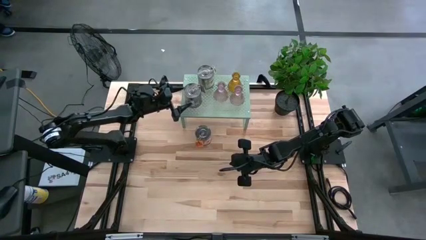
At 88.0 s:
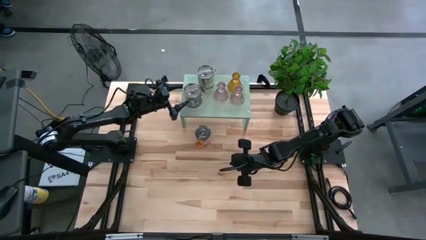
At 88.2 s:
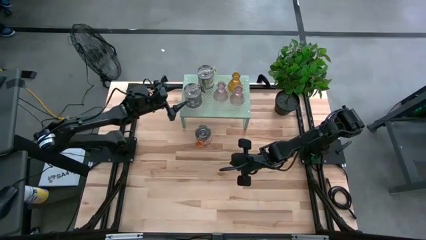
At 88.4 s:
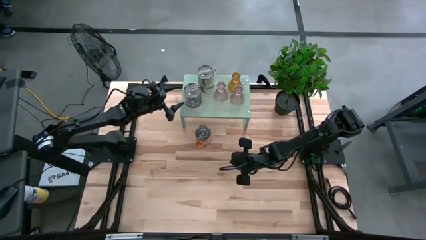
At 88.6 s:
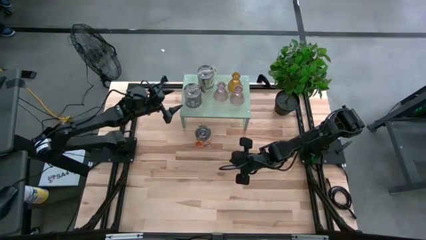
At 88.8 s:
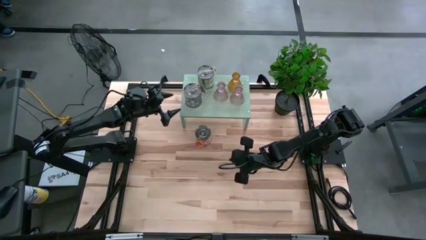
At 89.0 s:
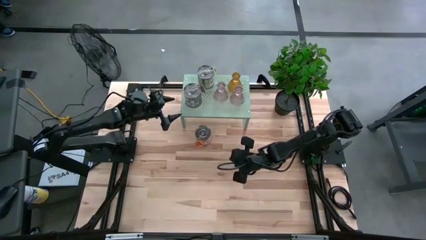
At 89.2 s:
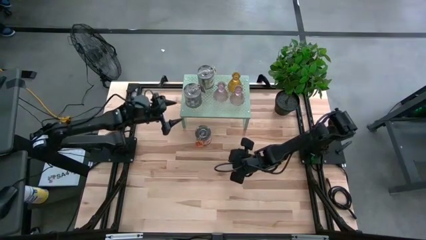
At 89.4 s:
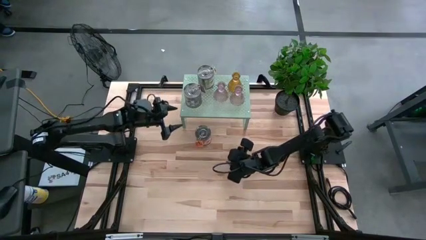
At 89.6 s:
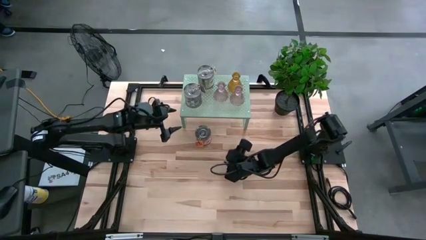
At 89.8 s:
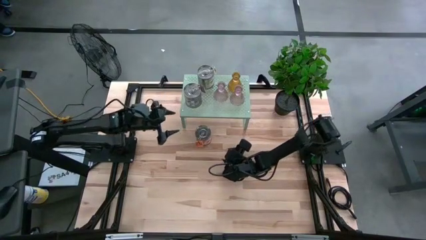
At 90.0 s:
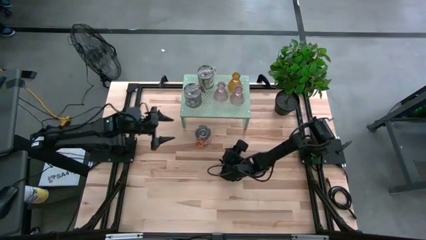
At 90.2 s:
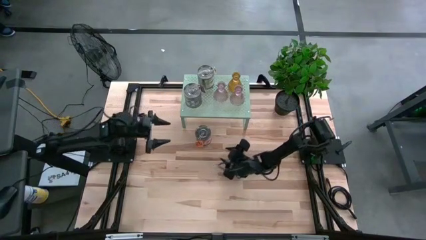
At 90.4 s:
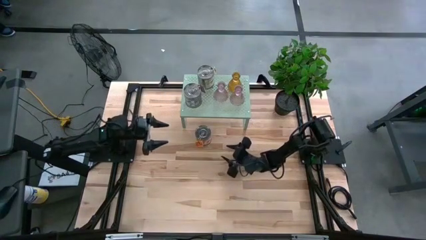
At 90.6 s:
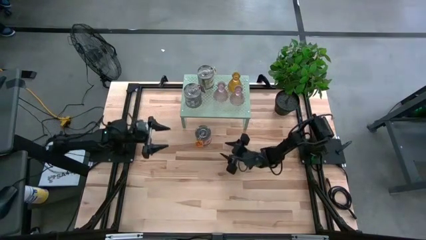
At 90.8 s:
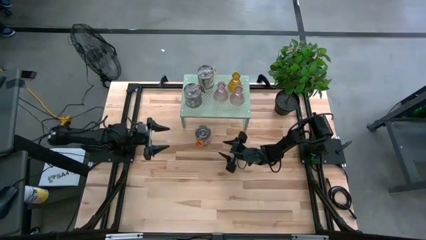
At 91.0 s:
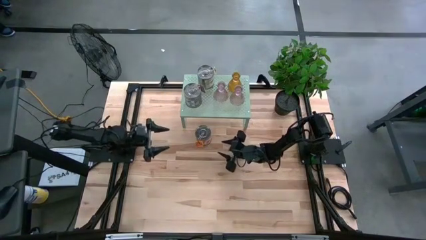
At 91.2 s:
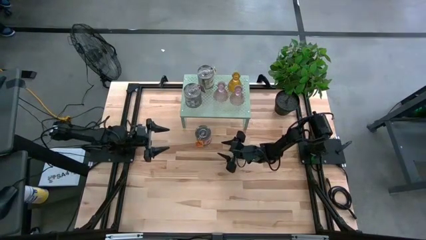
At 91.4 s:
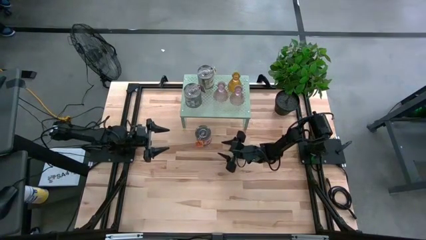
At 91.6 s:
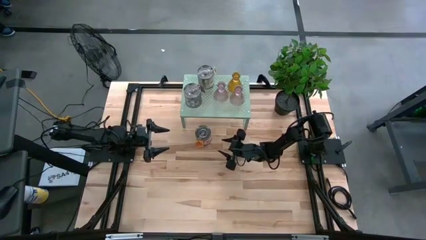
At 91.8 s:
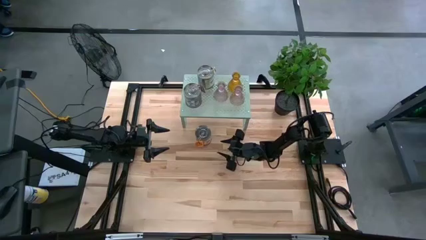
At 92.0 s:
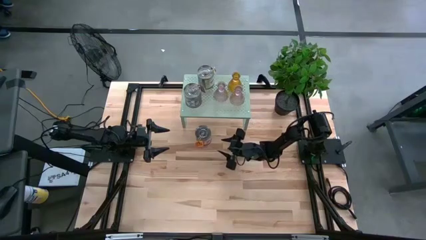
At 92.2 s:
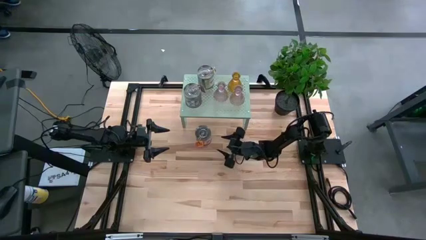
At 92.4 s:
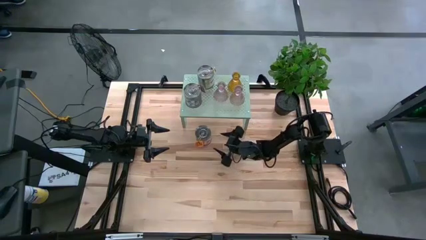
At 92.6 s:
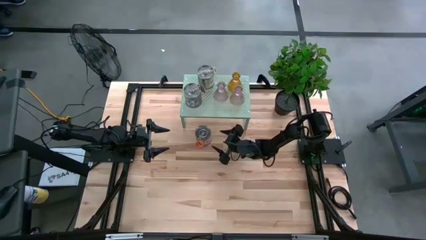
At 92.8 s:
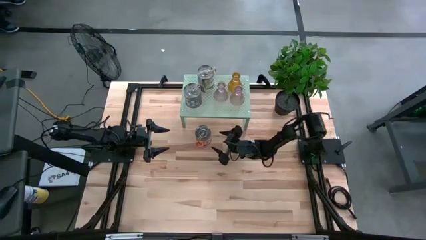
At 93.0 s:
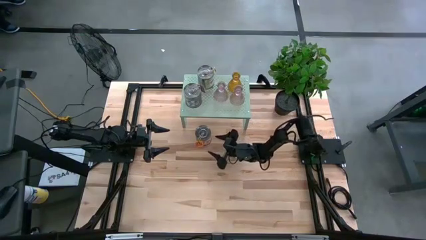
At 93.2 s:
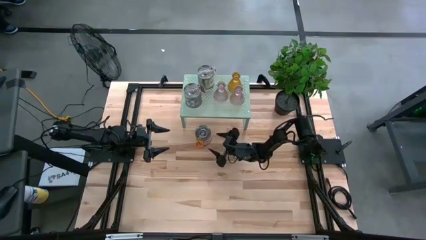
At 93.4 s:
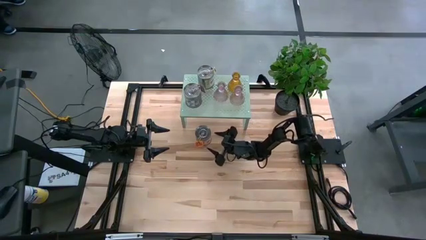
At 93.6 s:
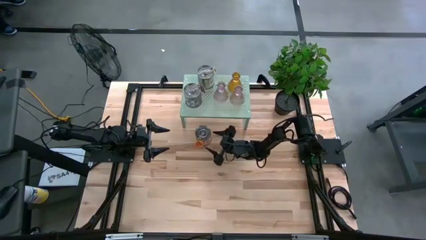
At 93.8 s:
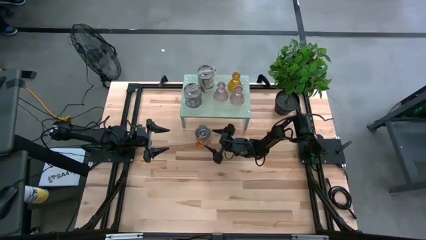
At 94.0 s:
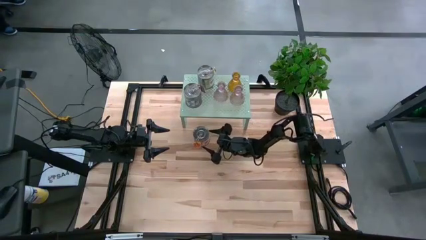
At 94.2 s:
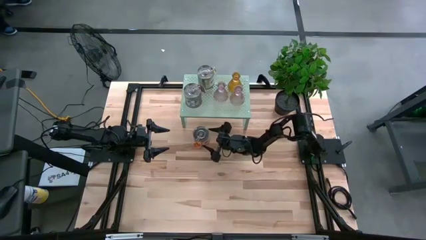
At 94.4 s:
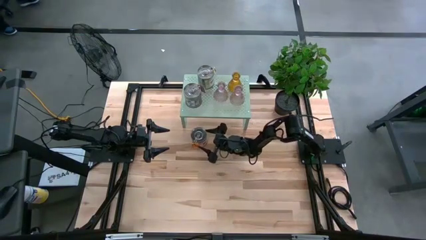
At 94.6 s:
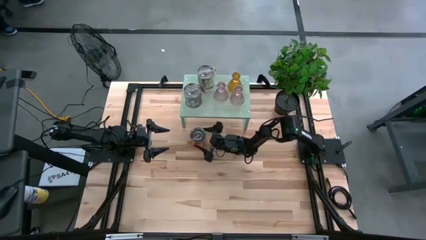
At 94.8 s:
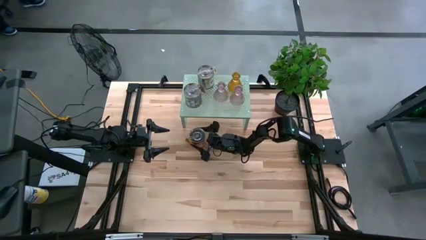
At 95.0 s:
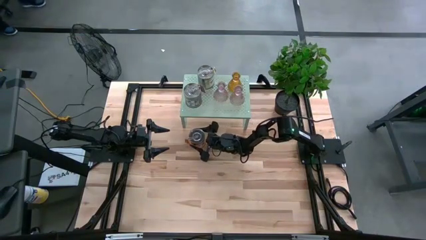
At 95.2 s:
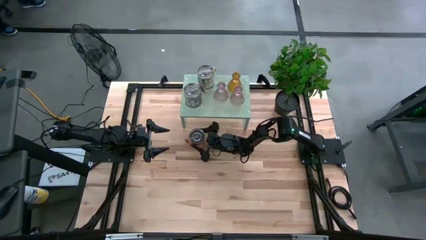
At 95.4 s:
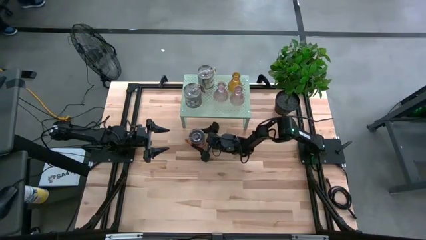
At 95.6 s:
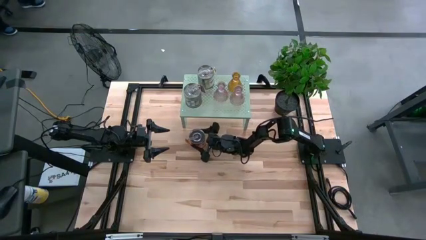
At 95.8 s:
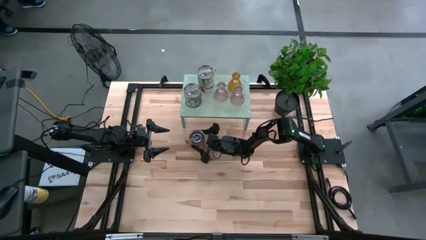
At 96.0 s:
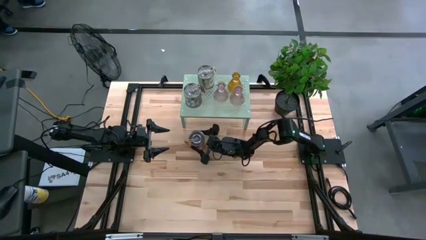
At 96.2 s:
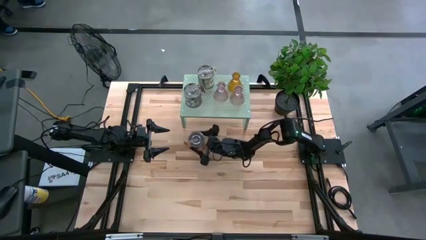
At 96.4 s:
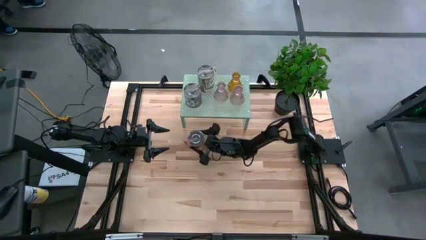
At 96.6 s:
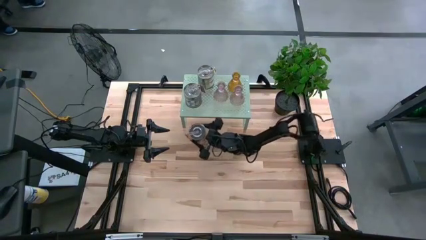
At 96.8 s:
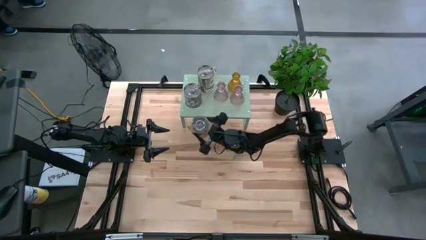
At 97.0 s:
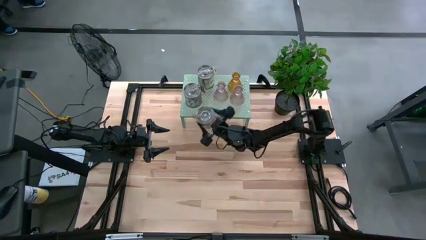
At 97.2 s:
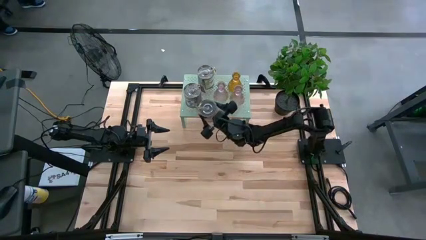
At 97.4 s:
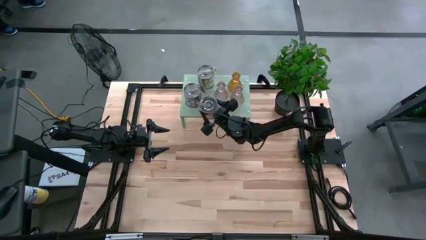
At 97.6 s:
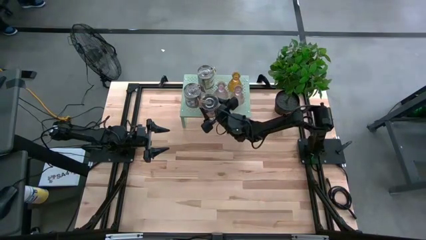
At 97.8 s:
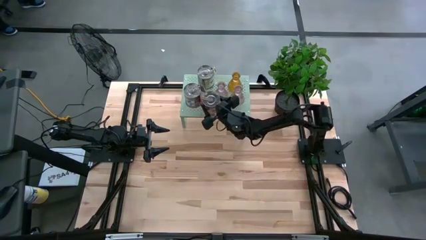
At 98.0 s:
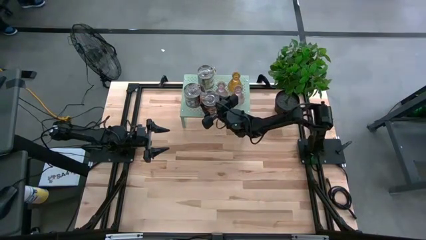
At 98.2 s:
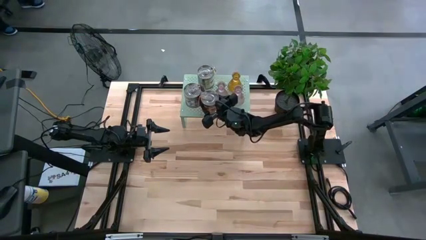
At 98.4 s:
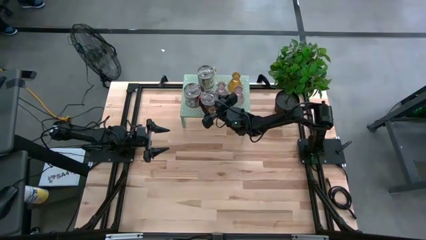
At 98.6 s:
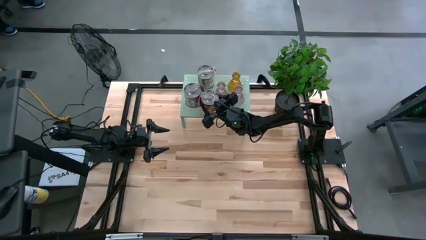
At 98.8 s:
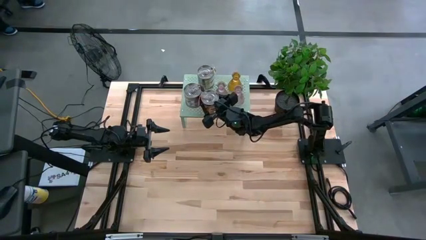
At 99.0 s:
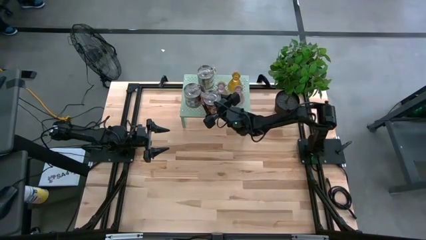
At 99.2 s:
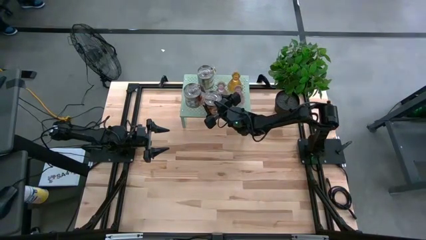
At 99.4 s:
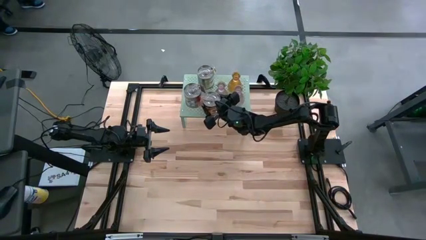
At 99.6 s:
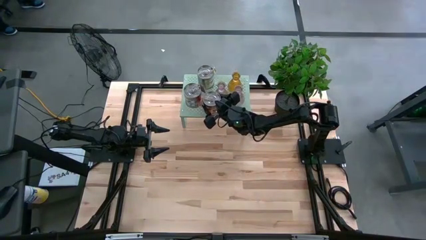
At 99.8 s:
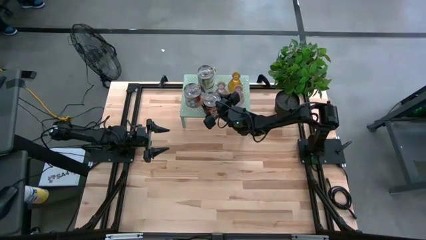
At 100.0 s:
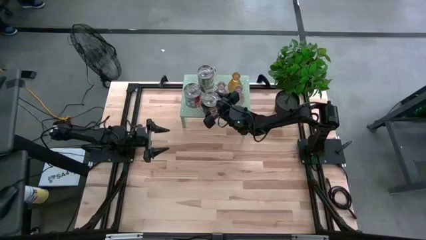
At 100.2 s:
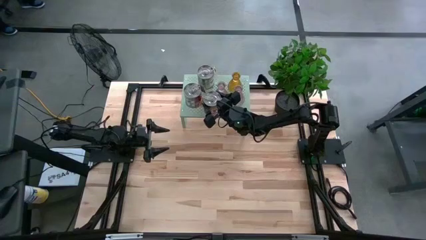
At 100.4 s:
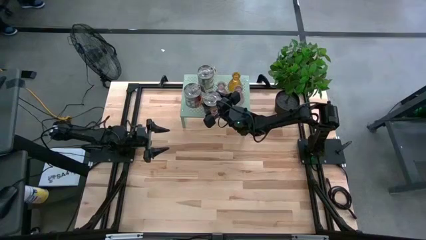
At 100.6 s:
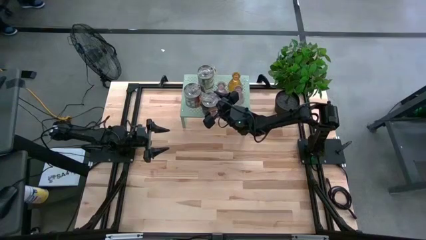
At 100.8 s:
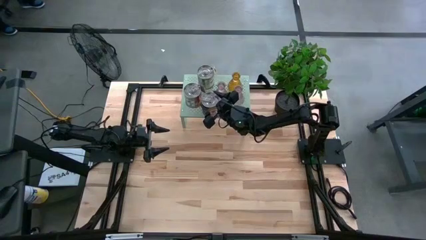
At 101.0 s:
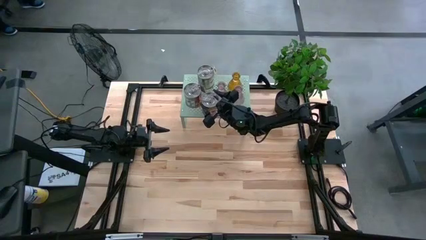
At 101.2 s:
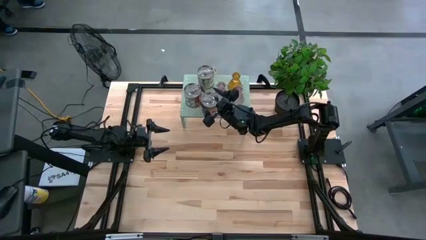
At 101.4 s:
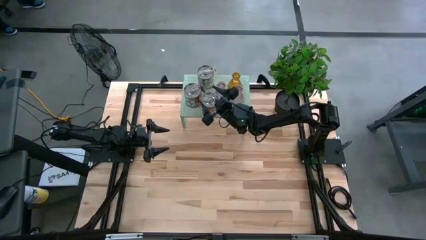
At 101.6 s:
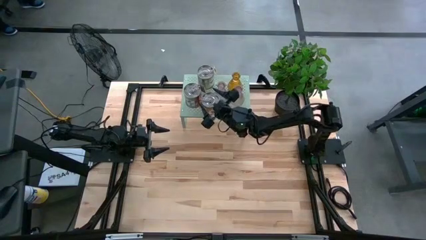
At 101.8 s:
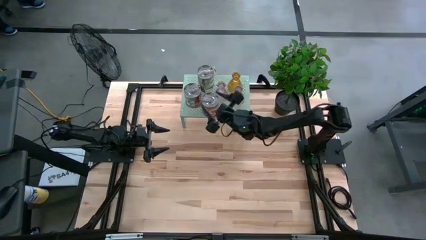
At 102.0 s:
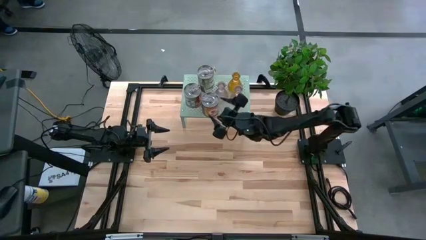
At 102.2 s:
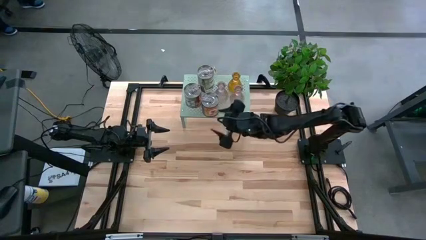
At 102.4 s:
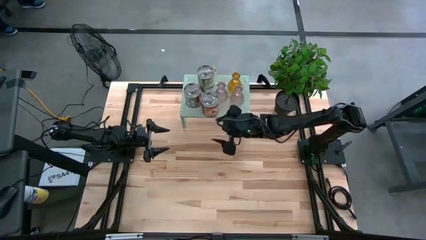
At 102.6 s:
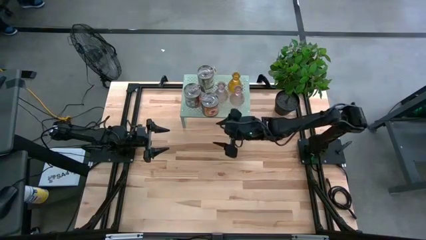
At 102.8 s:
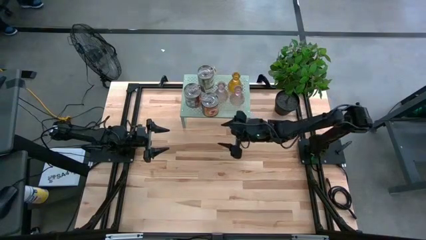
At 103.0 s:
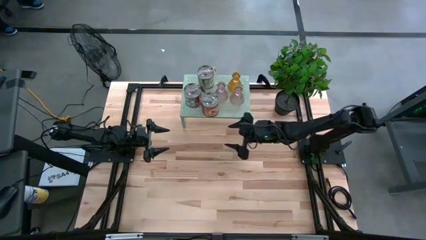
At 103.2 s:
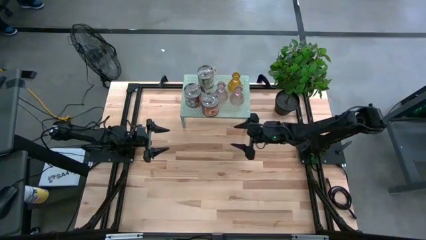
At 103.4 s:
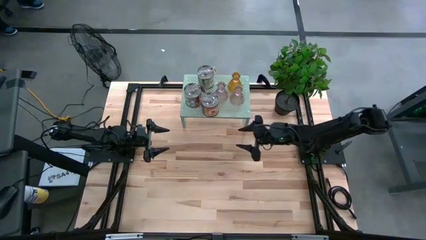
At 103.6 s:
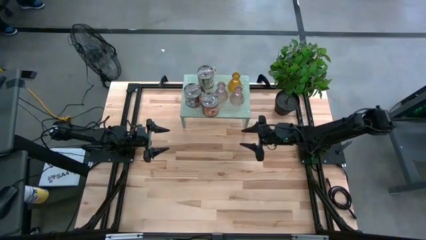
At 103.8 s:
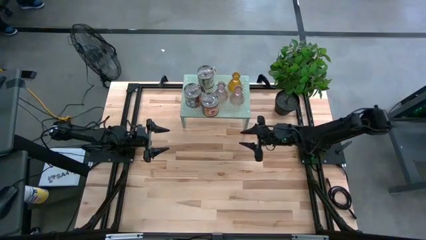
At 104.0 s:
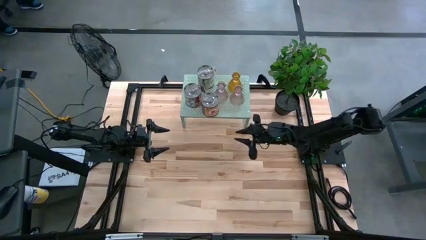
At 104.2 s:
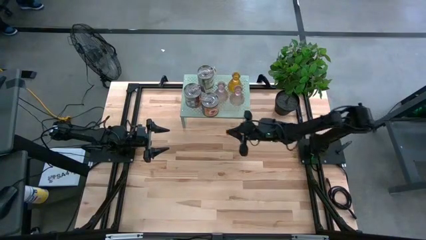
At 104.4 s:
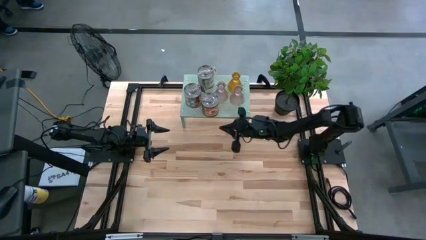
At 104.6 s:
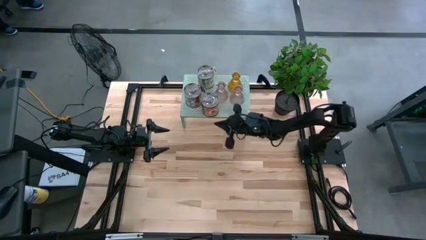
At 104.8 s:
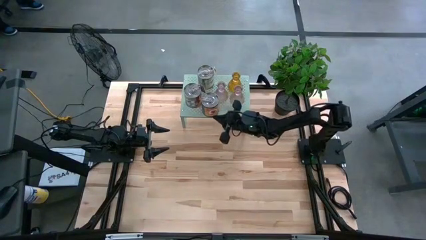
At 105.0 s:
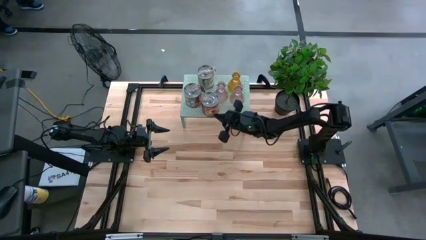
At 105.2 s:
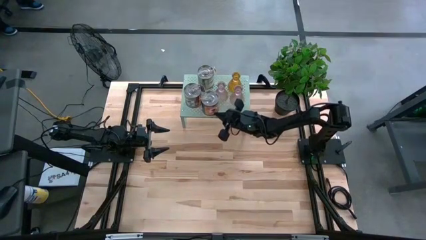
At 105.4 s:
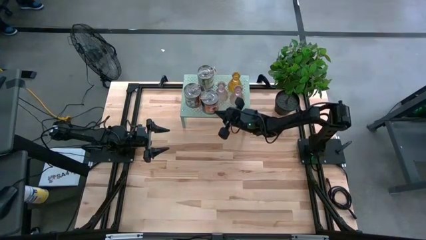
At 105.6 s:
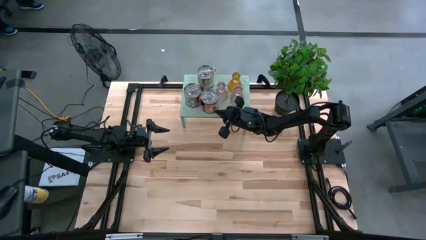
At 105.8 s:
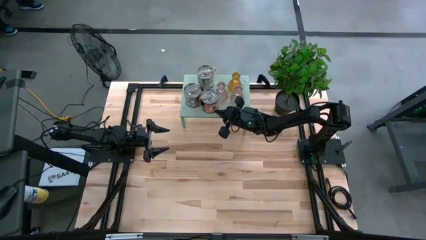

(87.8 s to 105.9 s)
Task: Pick & Place candle stick holders
Put the orange scented candle on the shelf
